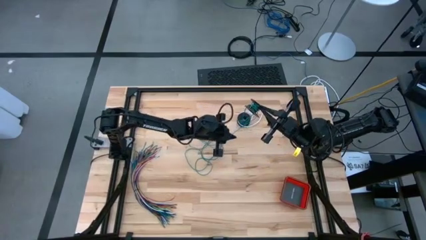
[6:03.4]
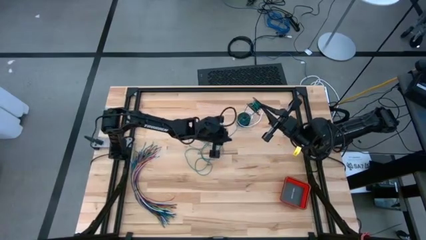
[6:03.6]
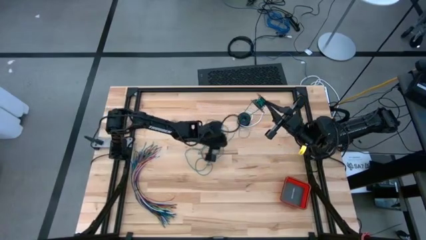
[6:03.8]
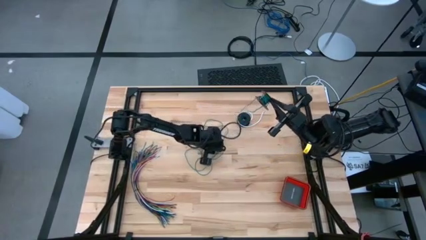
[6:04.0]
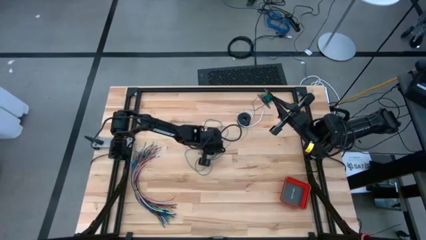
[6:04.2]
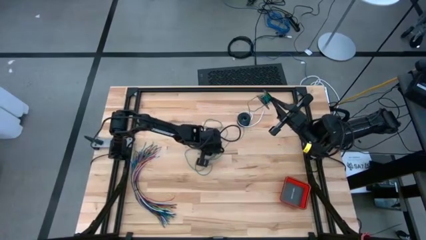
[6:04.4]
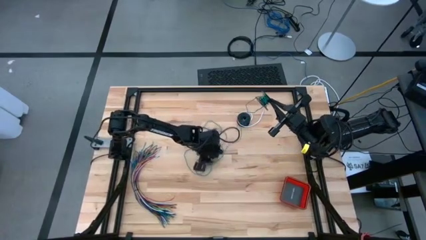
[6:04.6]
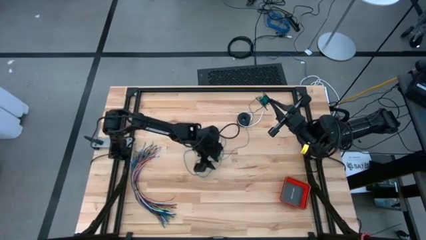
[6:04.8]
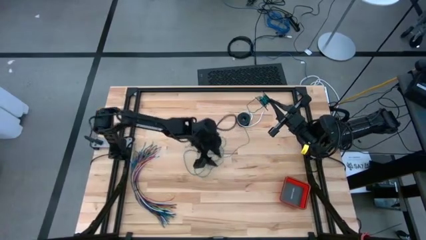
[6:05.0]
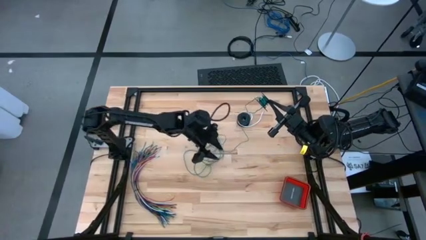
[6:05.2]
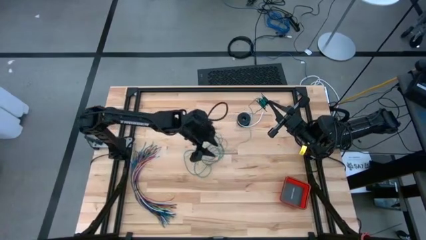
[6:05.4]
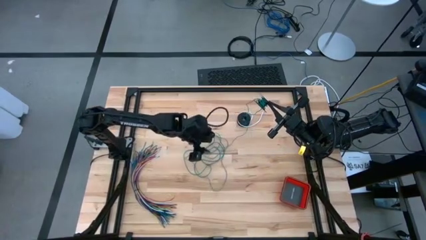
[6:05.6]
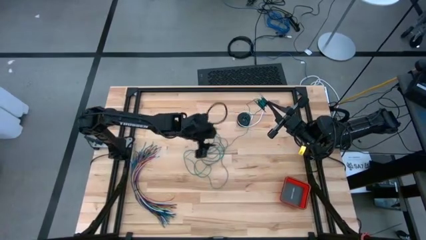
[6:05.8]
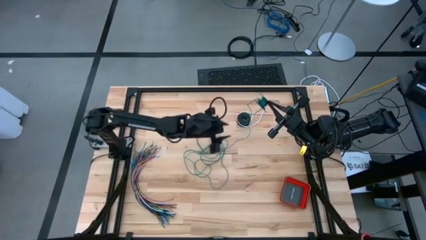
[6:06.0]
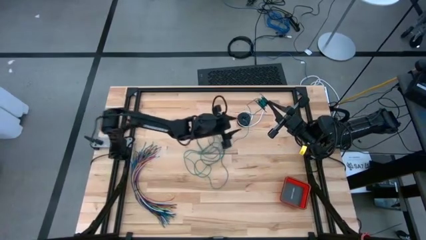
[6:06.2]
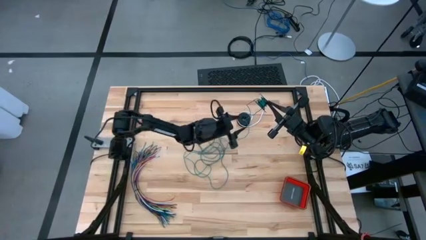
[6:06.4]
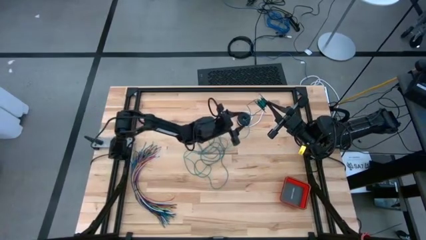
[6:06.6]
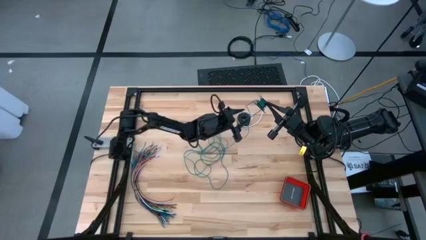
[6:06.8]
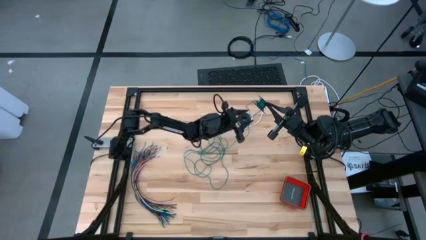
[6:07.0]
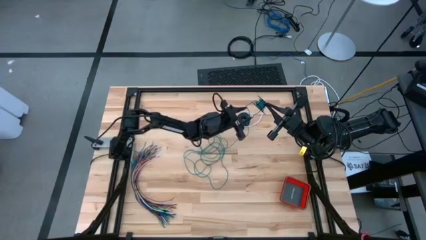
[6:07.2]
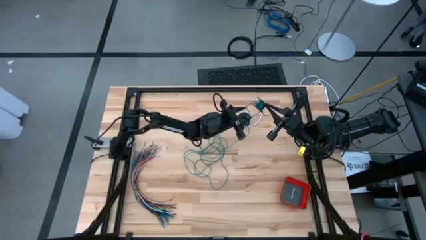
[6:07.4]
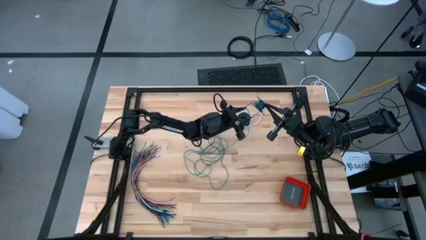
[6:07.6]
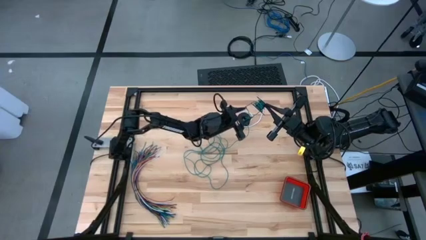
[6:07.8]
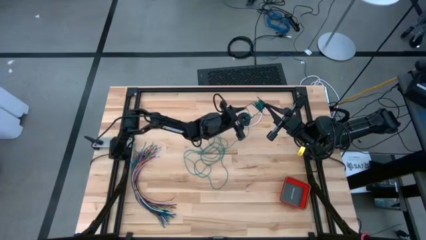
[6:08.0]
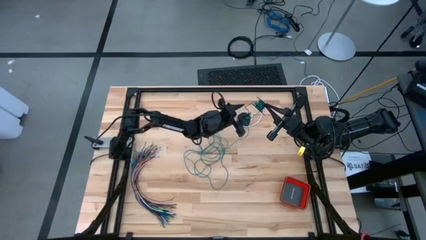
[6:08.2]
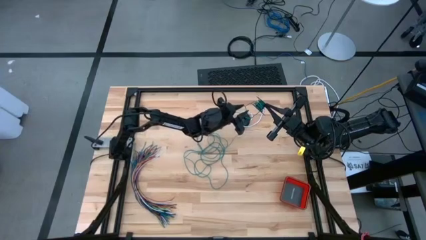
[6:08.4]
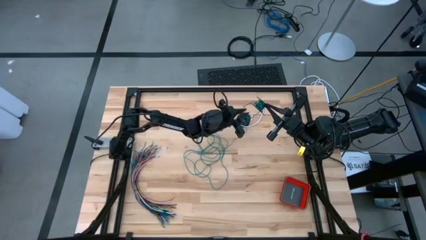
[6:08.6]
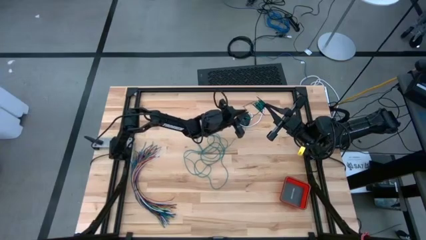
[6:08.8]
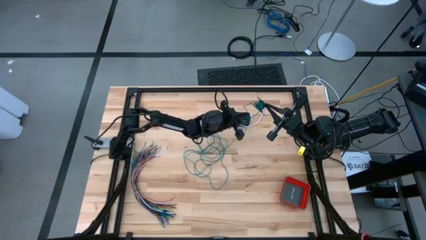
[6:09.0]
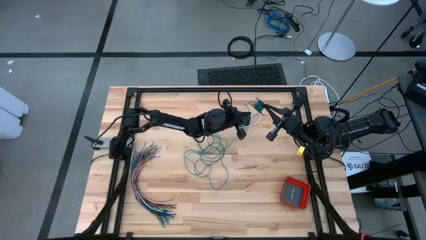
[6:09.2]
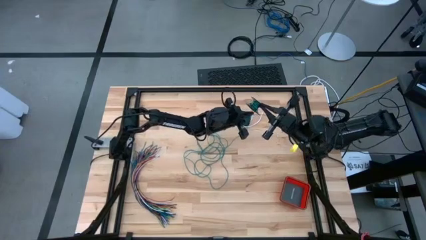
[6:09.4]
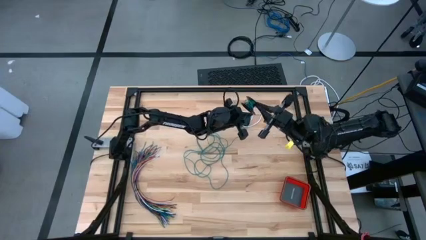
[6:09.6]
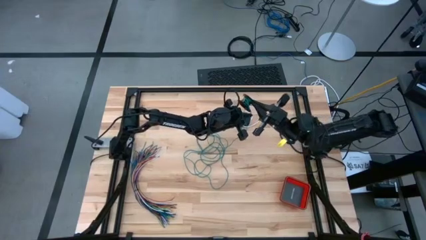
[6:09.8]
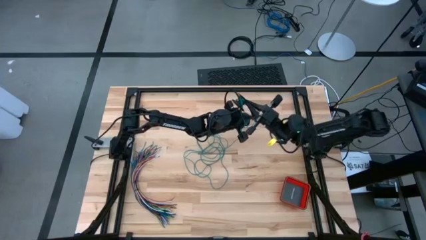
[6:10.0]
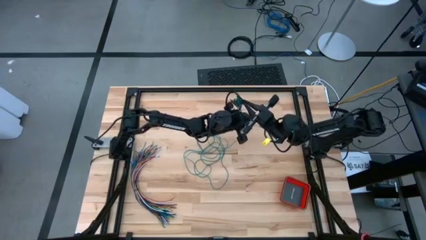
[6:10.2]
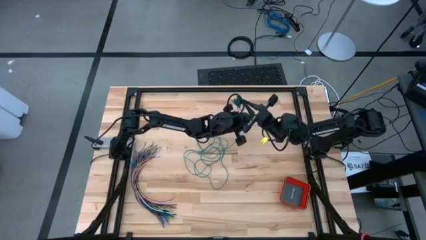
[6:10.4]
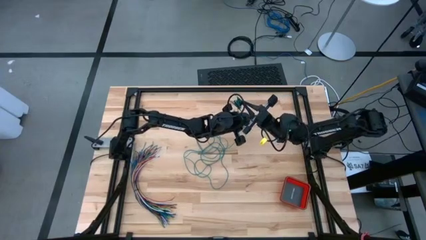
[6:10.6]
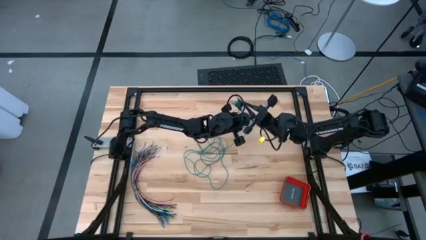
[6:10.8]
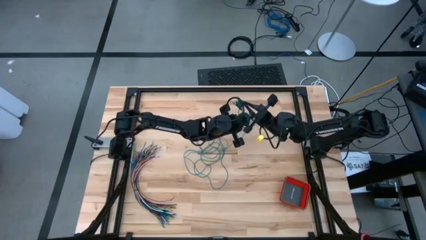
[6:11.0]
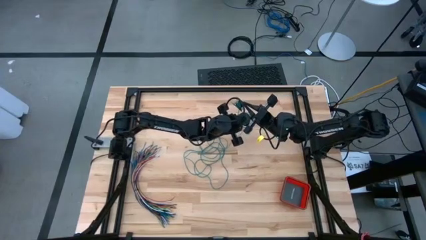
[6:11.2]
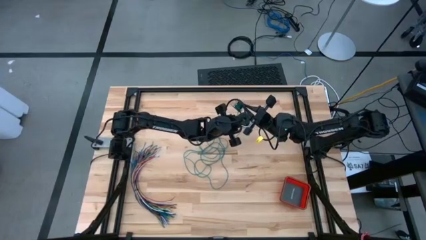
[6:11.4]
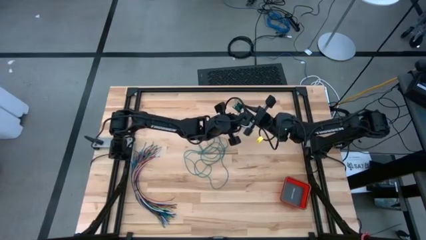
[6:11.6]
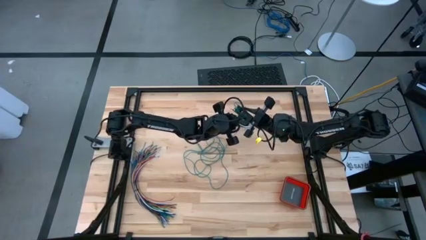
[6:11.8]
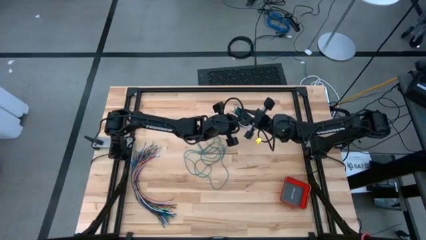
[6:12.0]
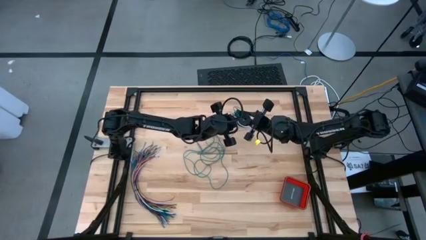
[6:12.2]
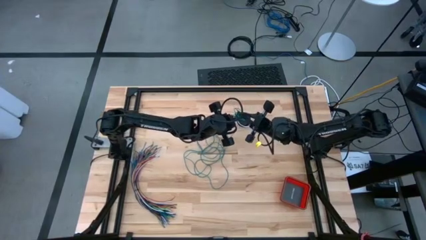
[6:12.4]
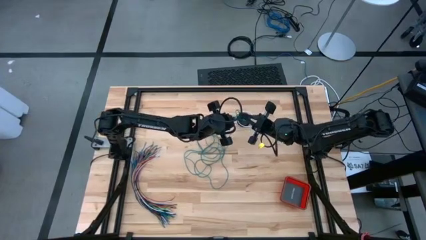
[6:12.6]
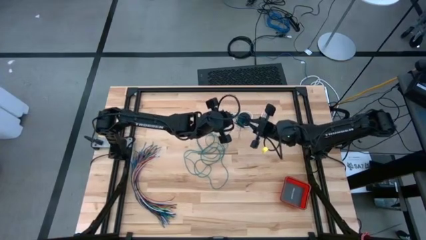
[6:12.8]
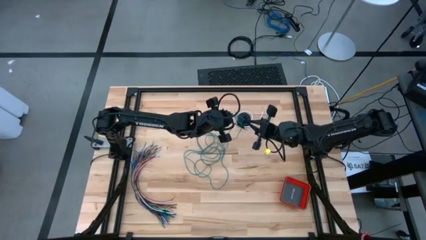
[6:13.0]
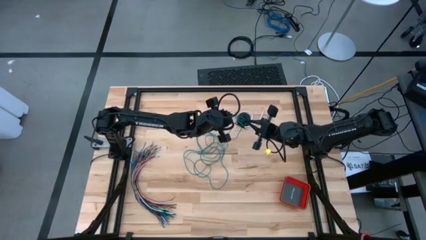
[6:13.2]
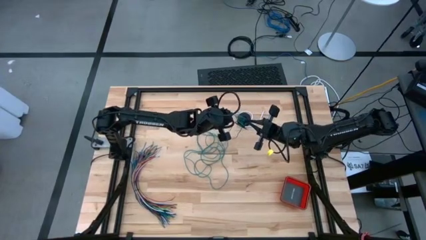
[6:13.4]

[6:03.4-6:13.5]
Task: Coil cords
Coil the green wire onto the spool

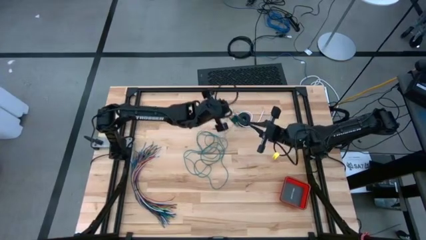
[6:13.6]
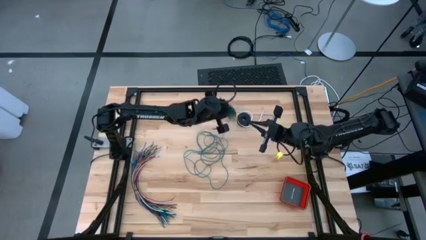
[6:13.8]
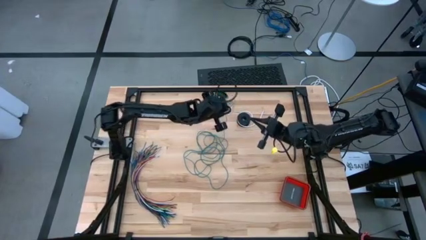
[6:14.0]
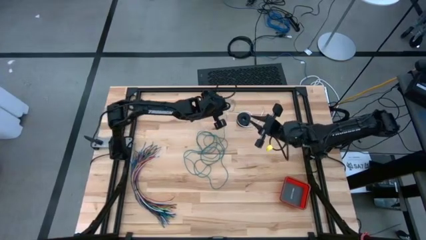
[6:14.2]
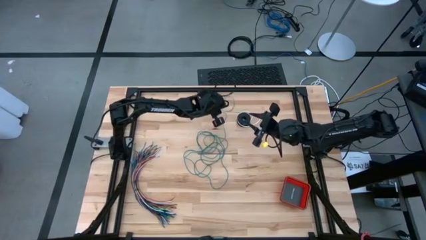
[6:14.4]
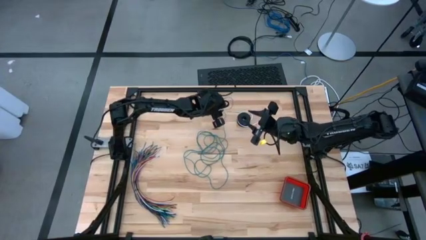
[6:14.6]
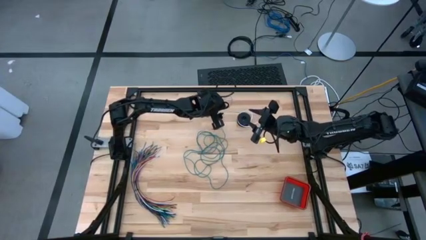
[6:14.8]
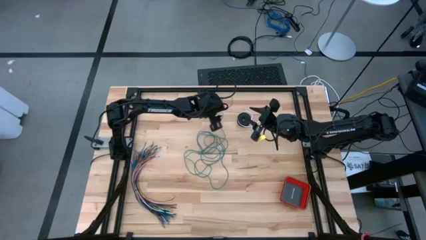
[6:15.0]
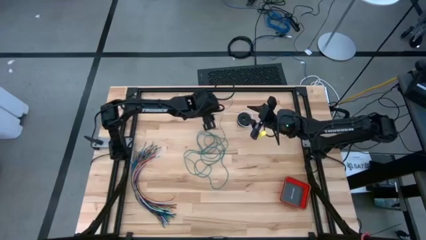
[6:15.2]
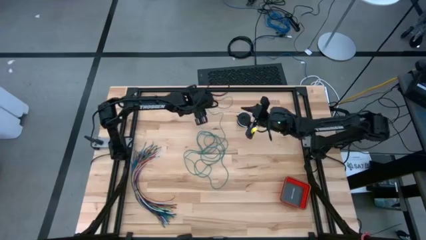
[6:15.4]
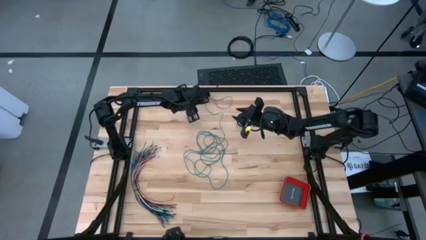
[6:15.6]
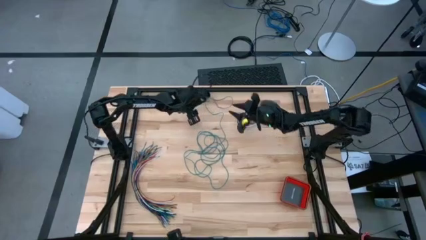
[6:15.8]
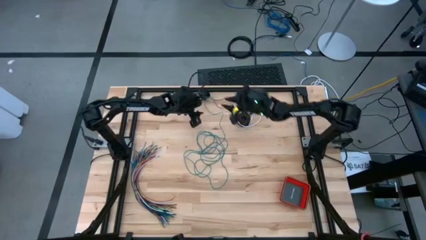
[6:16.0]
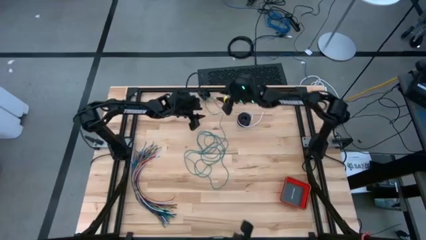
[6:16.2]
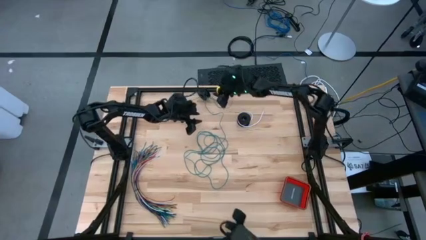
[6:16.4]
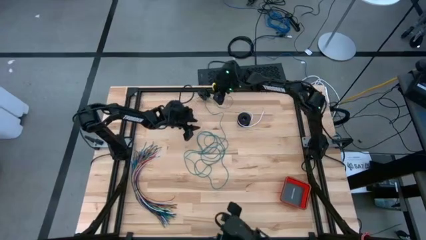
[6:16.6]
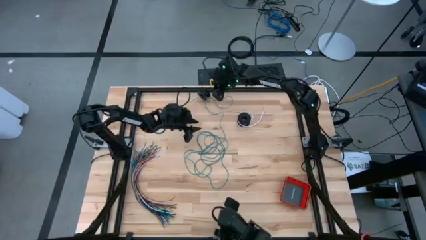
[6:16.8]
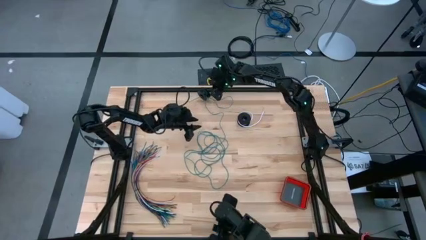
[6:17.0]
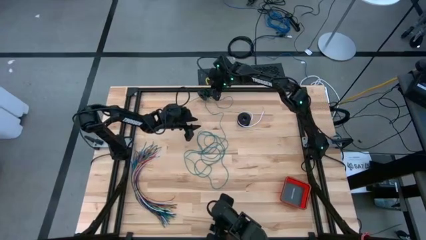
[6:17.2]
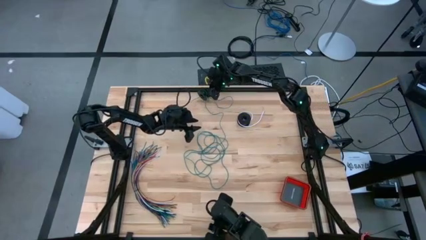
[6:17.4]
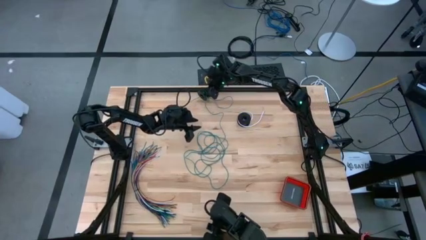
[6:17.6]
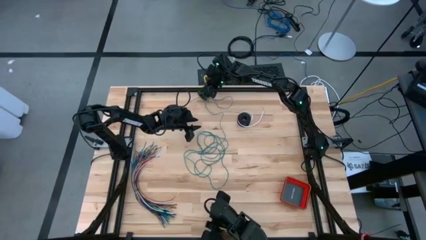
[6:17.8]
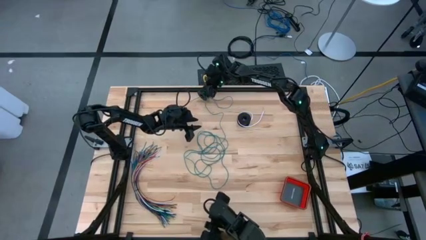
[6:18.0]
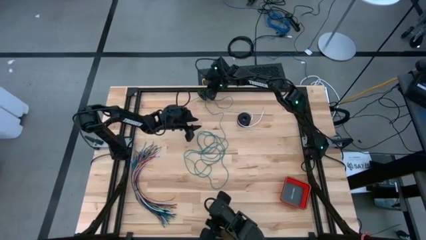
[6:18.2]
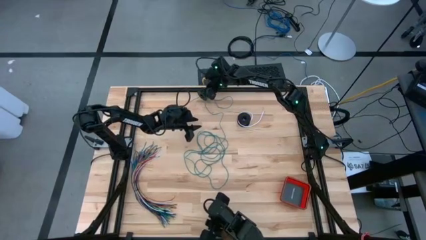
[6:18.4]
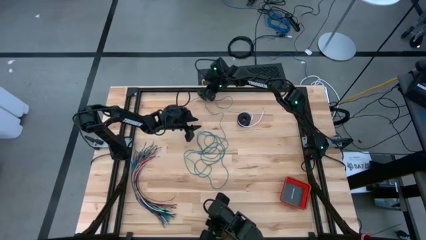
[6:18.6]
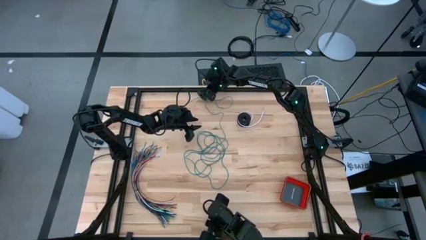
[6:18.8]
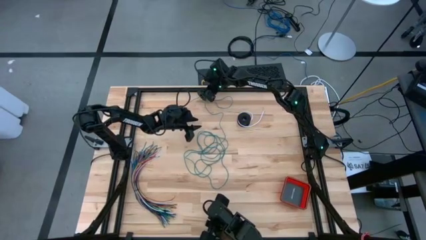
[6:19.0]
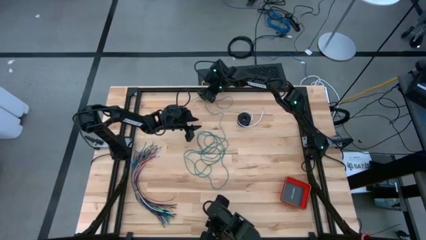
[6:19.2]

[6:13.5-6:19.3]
Coil the green wire onto the spool
